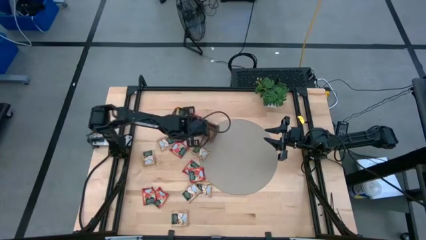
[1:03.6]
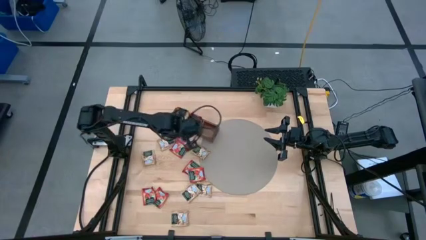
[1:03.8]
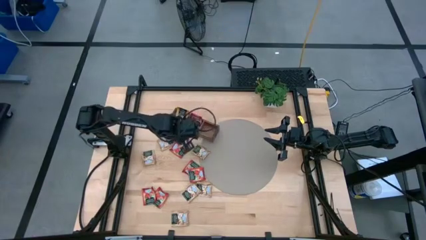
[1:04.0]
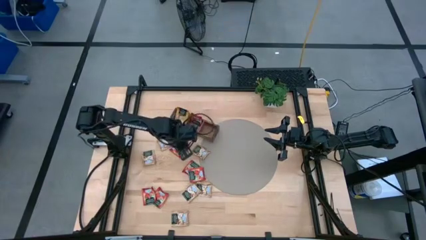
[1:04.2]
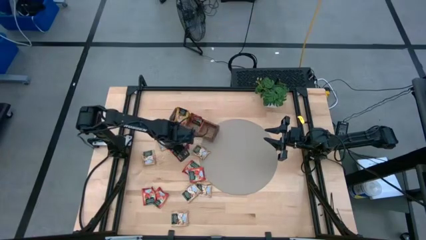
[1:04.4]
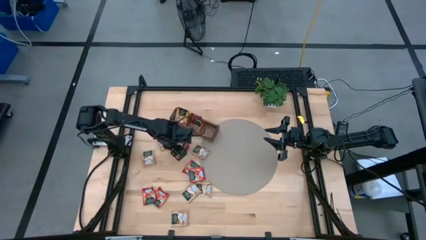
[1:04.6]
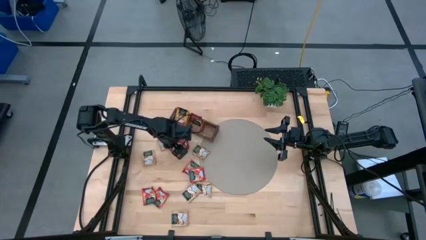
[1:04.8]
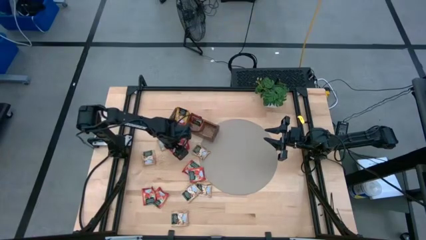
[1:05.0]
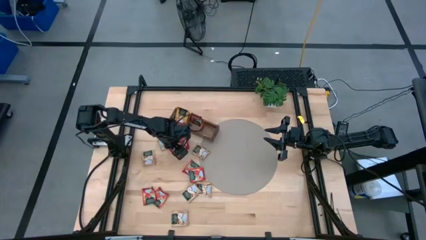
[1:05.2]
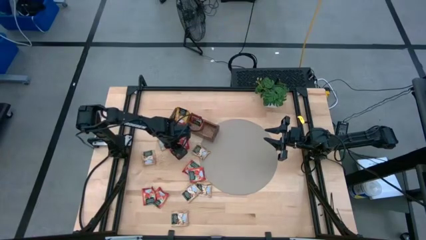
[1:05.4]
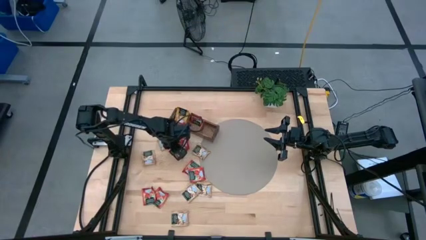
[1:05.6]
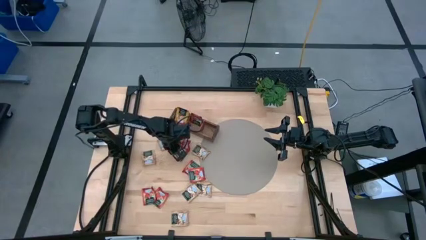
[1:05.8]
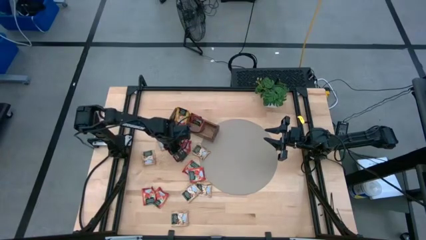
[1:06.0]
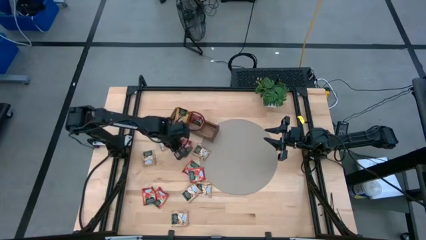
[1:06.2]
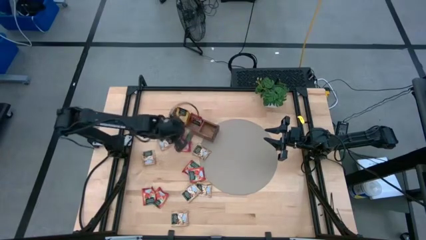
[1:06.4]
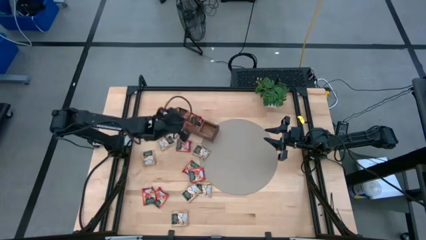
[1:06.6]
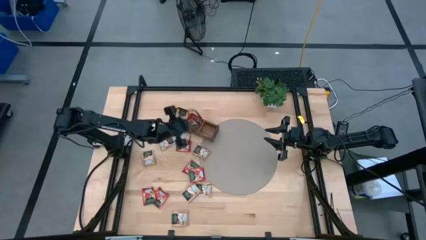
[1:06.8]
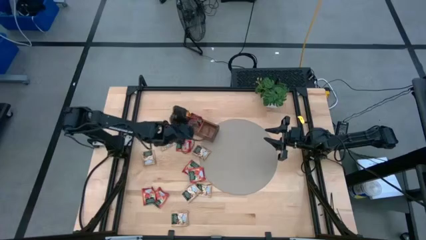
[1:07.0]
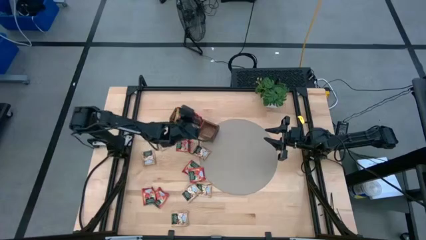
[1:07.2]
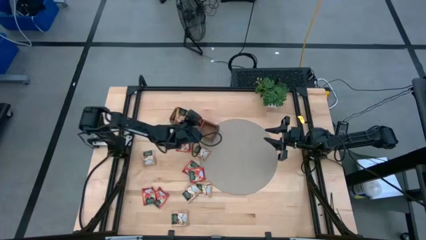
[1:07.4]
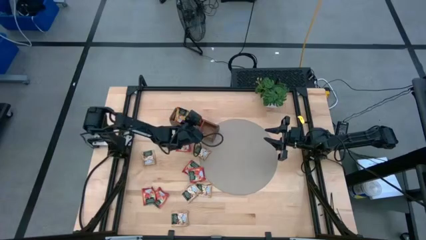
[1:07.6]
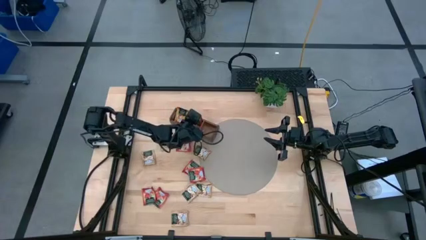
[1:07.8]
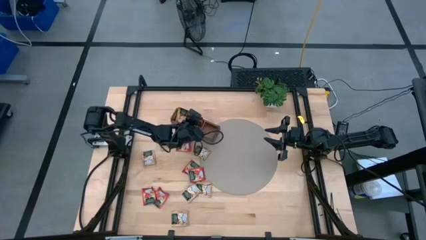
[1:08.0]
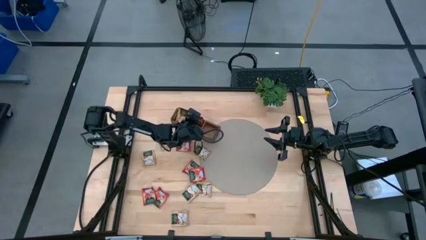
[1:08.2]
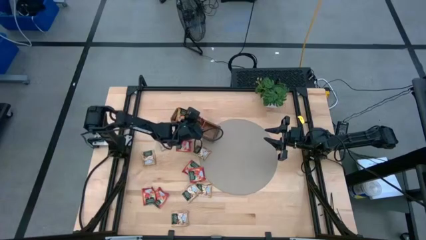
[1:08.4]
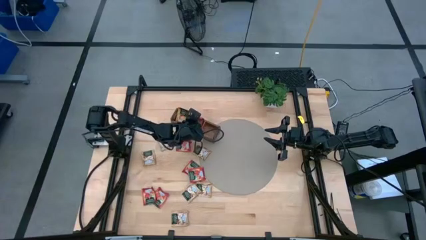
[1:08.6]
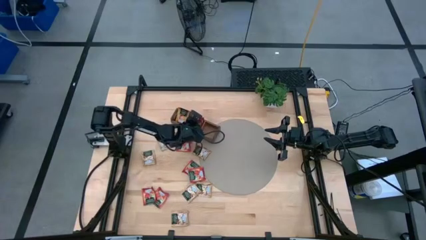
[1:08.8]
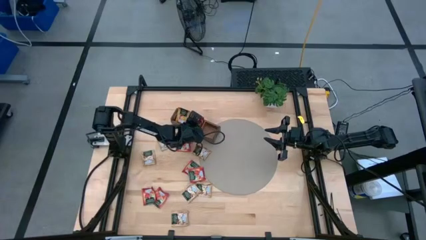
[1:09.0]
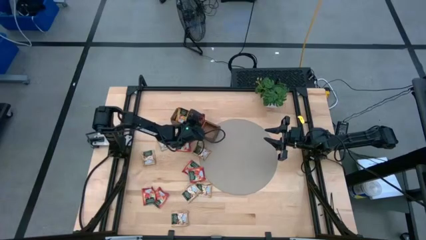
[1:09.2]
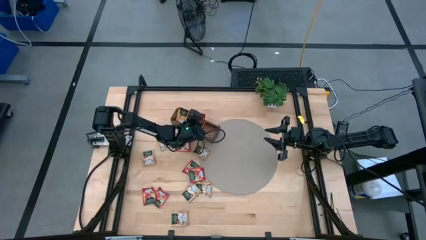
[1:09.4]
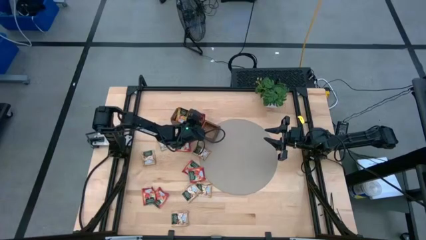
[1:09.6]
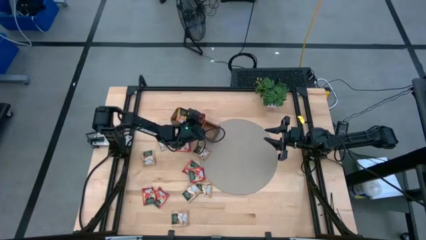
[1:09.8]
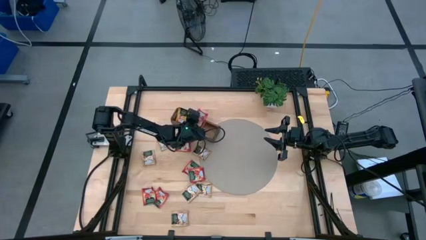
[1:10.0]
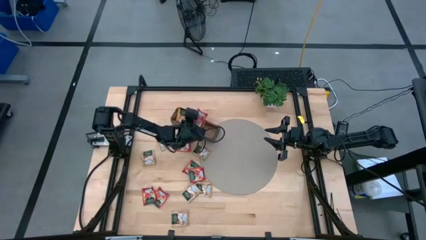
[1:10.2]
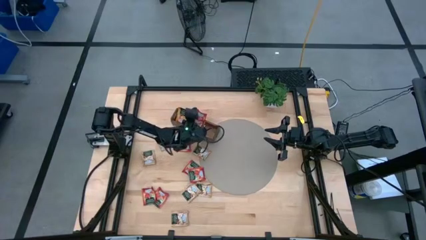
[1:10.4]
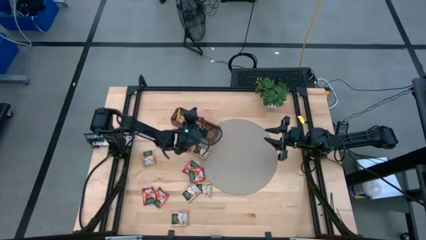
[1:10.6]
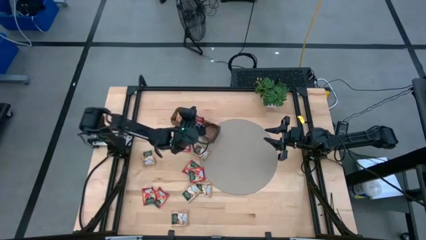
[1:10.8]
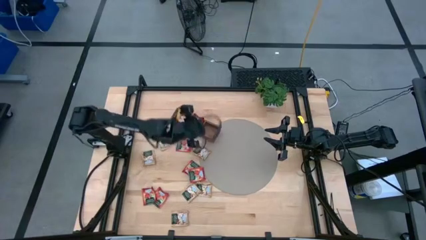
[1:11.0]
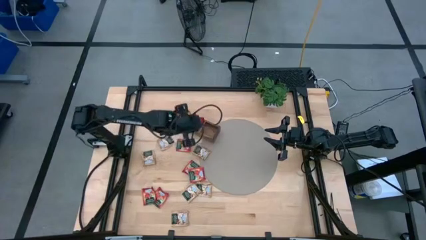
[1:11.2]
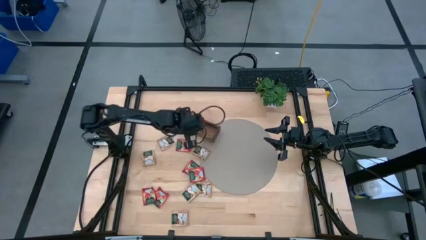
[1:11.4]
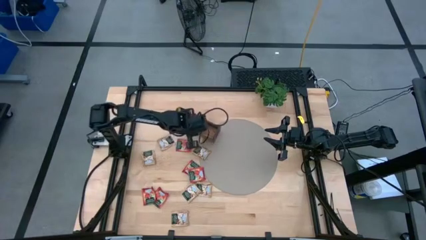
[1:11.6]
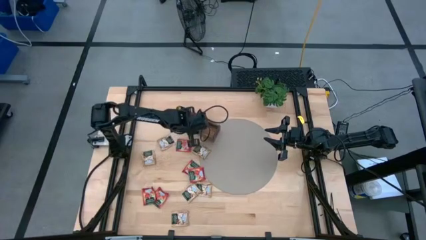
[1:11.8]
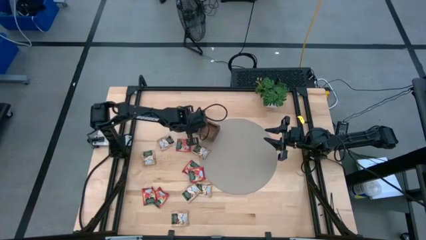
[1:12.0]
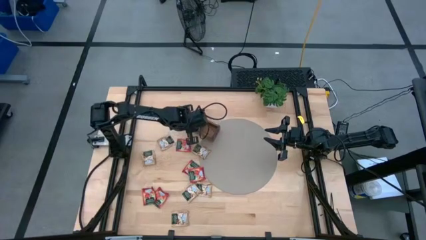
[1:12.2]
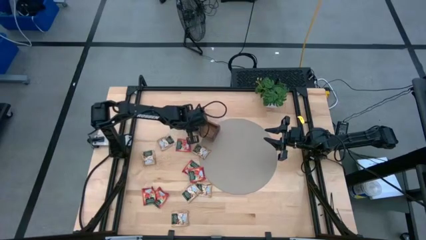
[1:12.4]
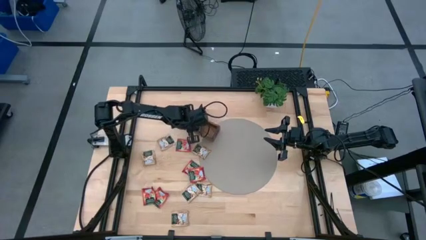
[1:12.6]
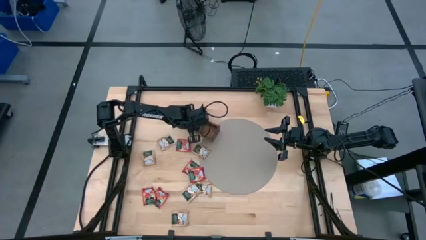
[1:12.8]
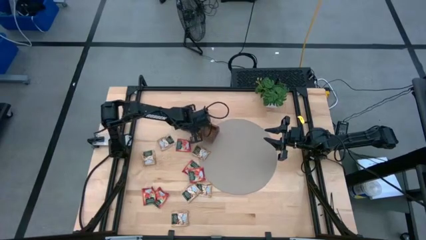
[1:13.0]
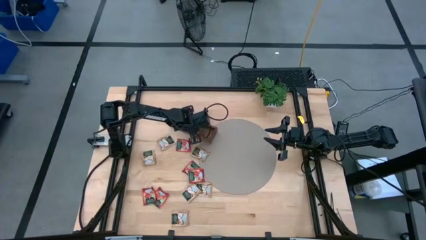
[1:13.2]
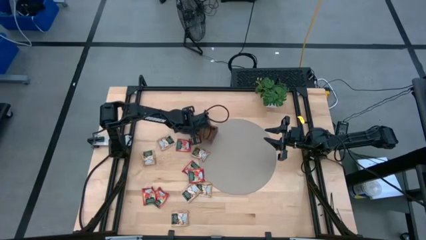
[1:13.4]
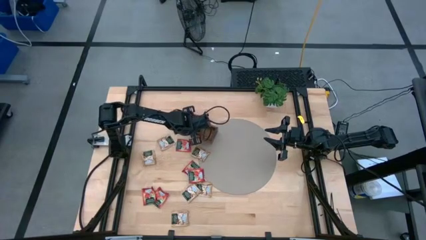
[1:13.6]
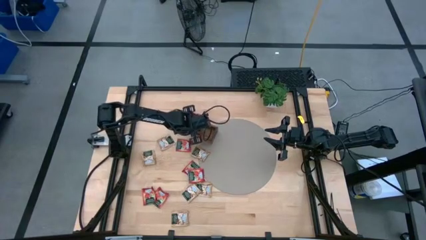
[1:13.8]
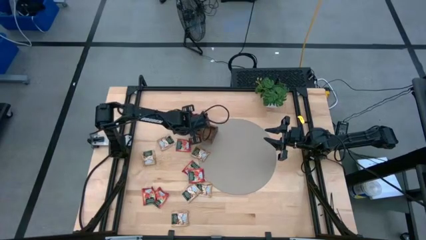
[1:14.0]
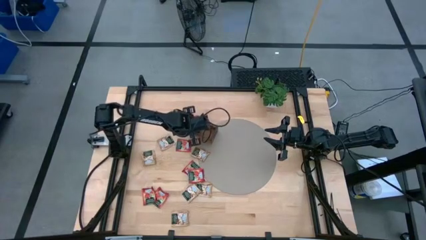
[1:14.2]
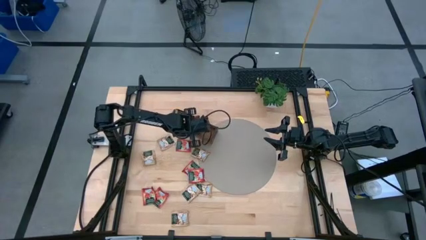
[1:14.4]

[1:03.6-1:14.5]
Task: Pick & Place Tea
Put the red tea bag into the middle section of the wooden organizer

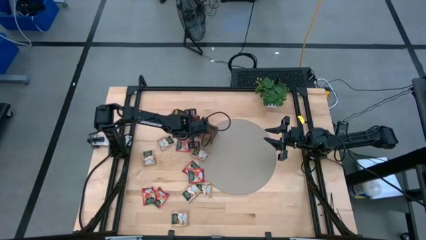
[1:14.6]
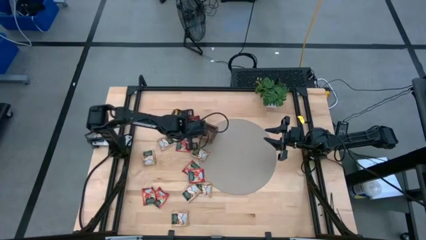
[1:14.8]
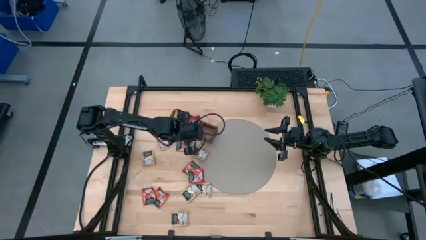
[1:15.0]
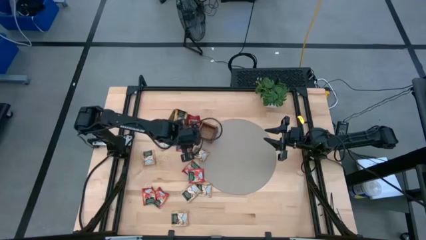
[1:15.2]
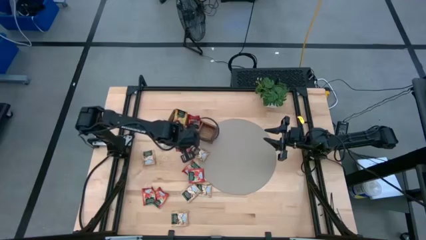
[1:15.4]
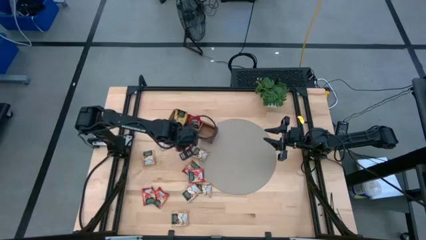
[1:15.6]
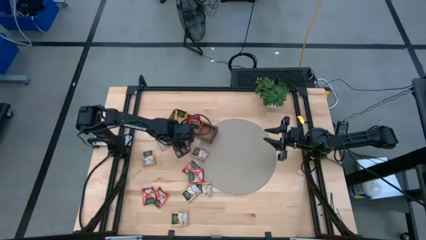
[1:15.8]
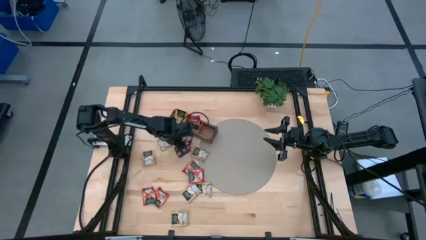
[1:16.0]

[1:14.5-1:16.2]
Put the red tea bag into the middle section of the wooden organizer
